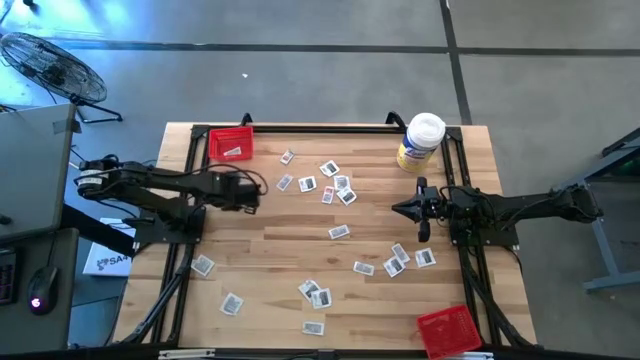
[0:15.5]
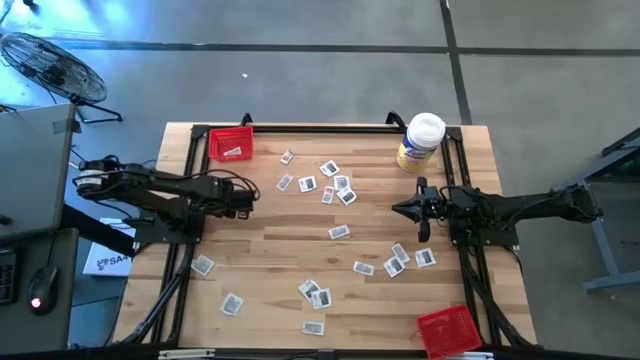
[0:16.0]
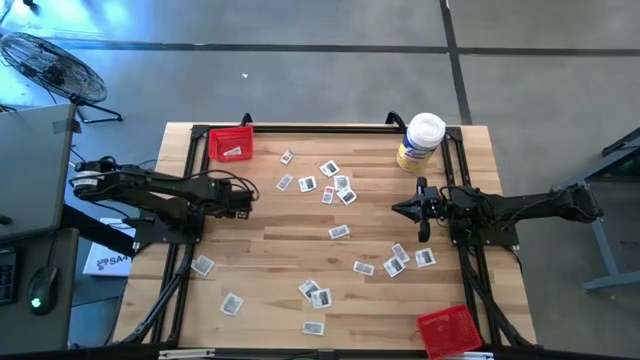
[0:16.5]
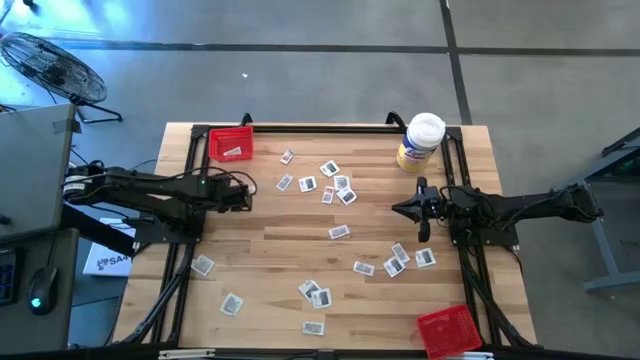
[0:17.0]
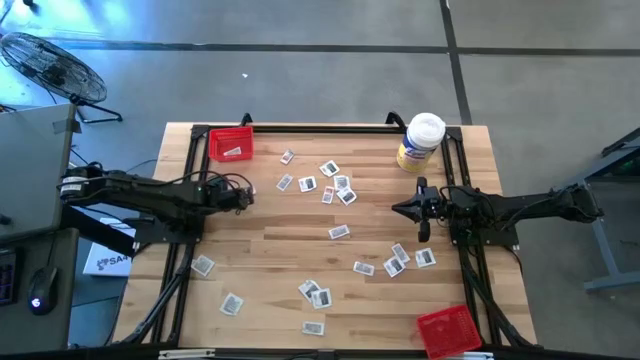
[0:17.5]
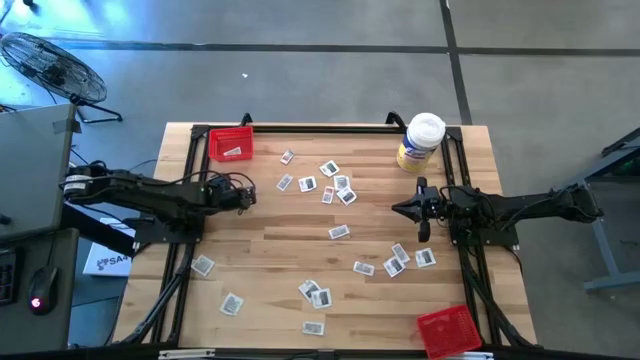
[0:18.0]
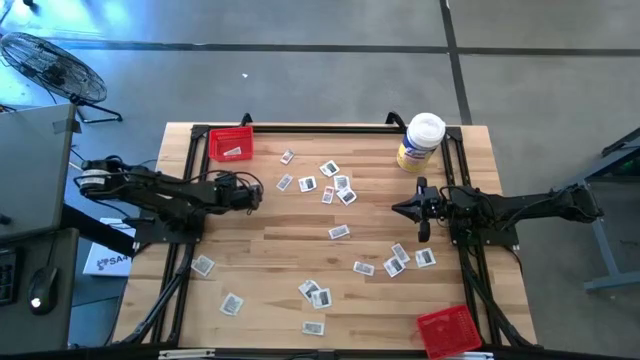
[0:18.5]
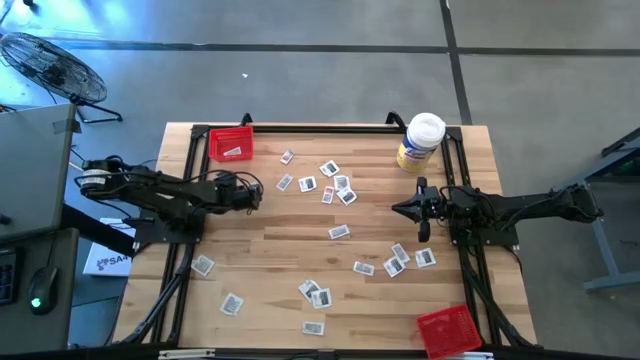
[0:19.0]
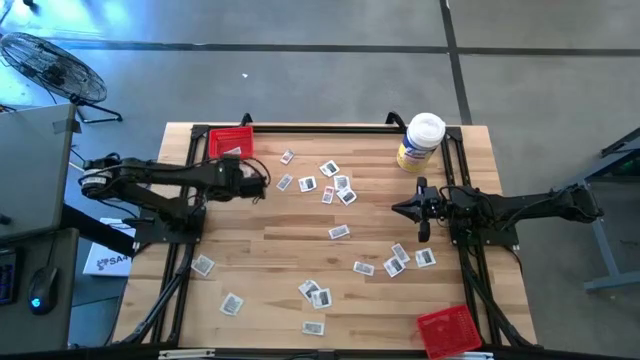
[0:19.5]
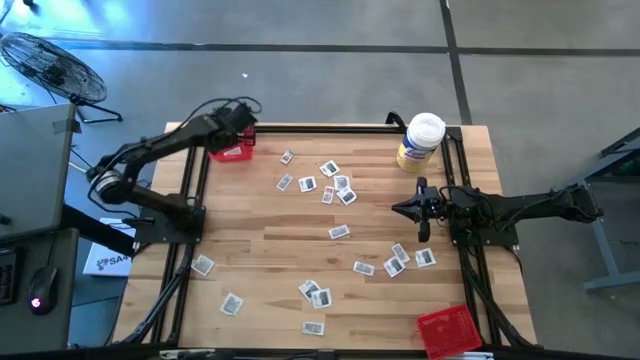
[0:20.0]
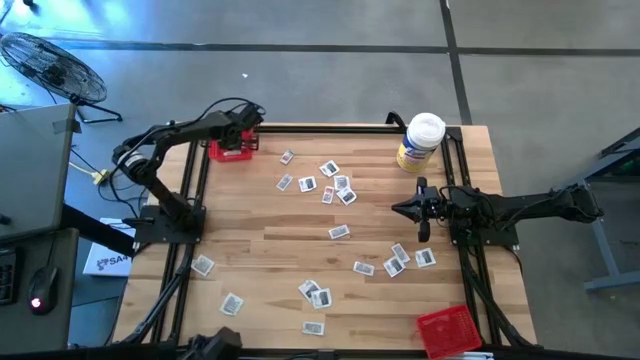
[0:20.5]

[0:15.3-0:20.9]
Task: Pick & Place First Aid Supplies
Put the white and orange ointment pack into the top red bin

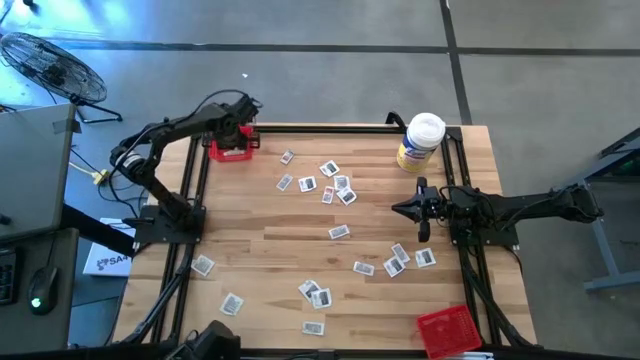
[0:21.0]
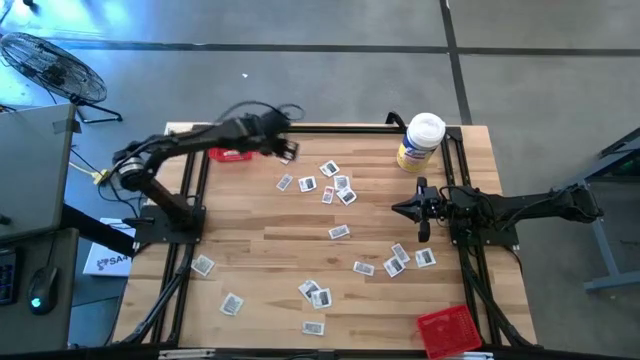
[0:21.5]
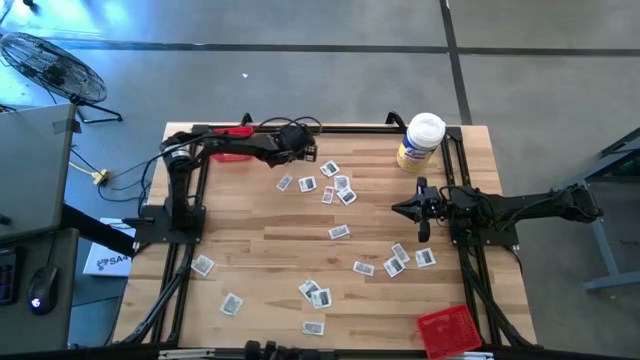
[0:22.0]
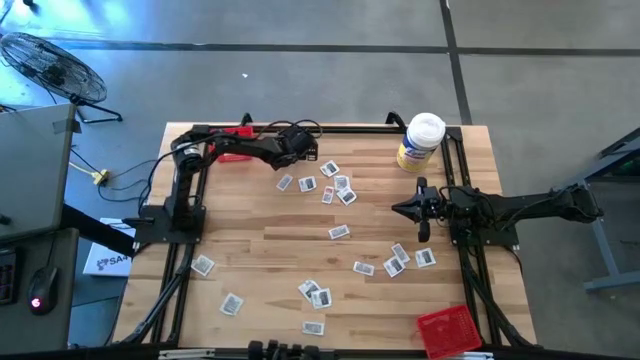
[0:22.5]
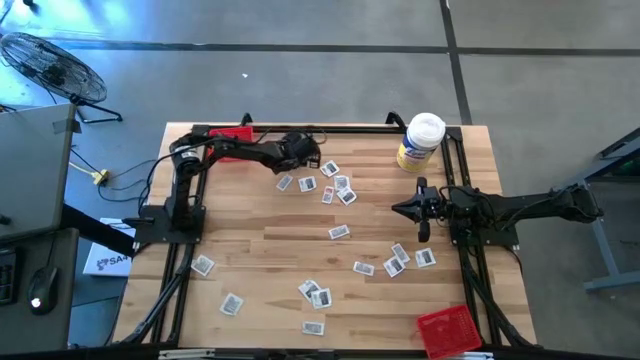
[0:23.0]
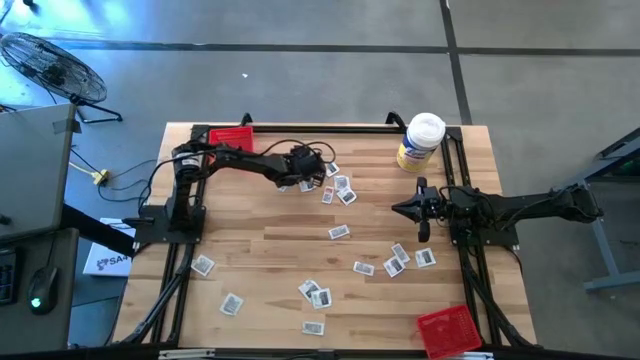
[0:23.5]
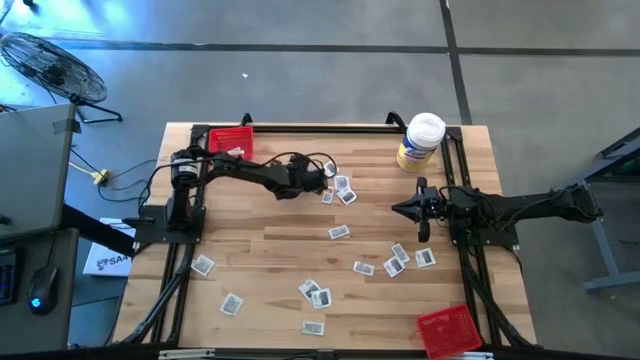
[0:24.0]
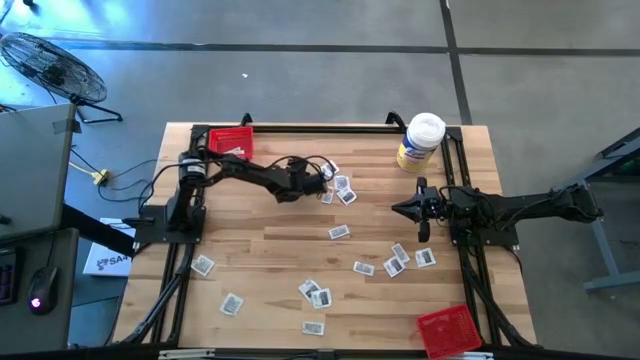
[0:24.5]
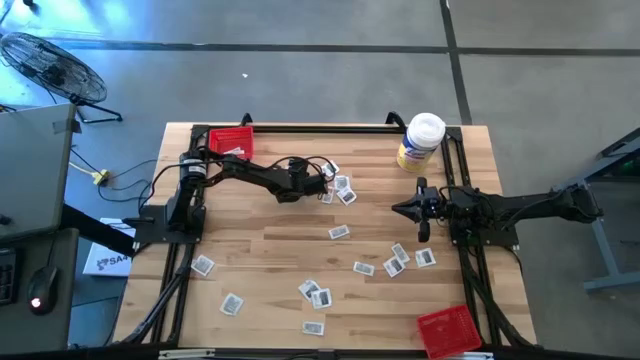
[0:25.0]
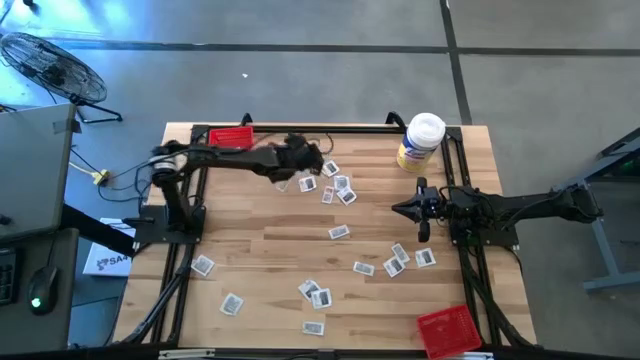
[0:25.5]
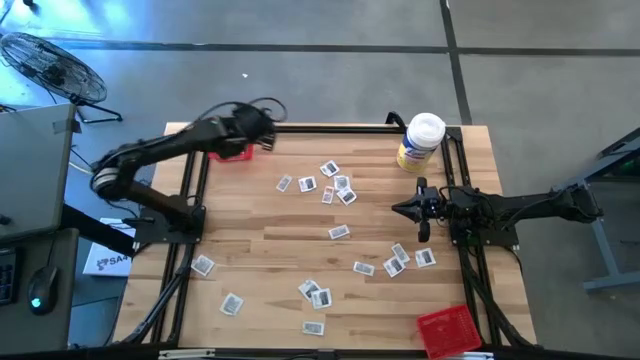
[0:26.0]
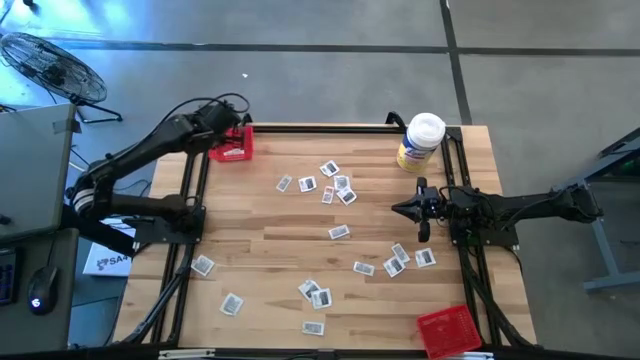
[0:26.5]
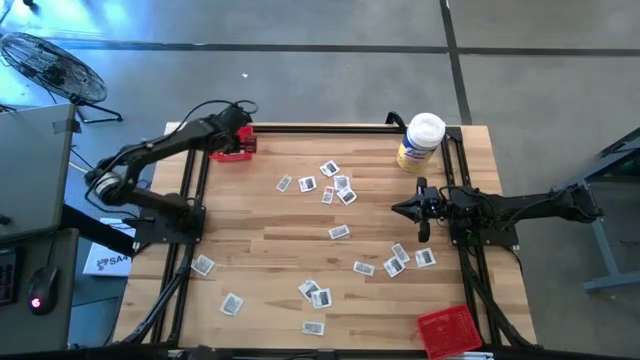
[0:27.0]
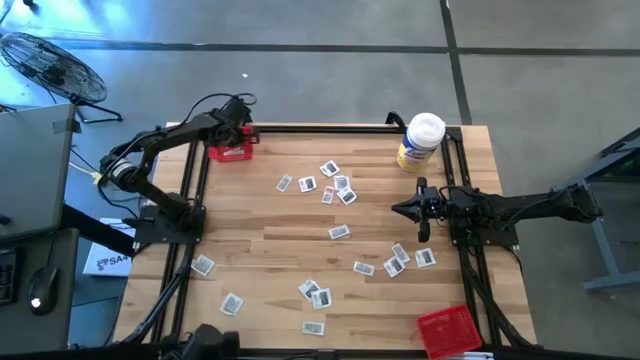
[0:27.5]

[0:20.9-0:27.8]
Put the white and orange ointment pack into the top red bin

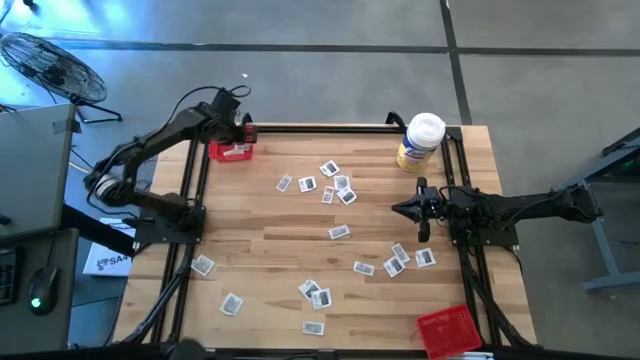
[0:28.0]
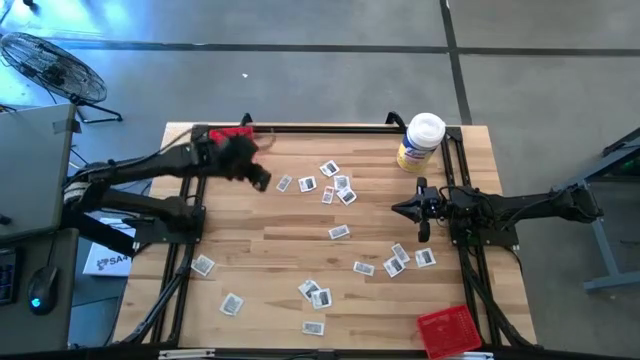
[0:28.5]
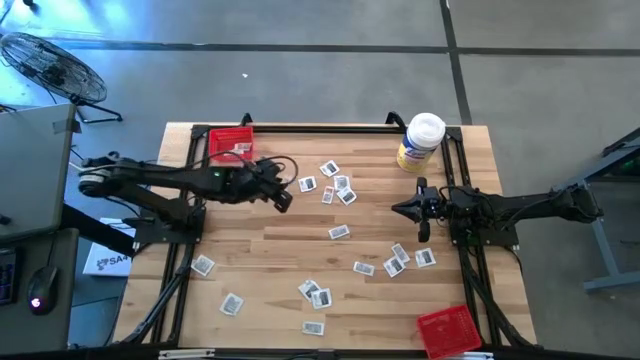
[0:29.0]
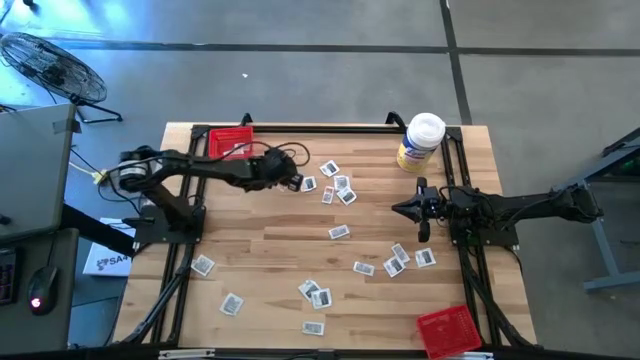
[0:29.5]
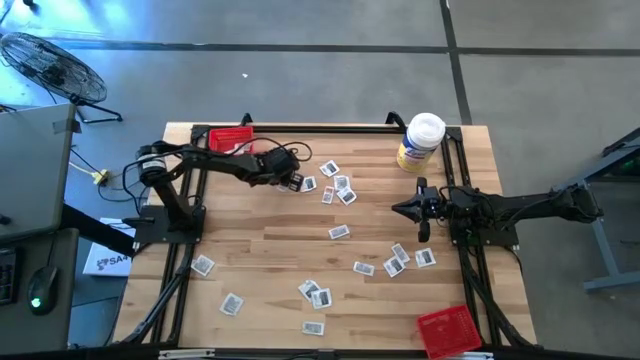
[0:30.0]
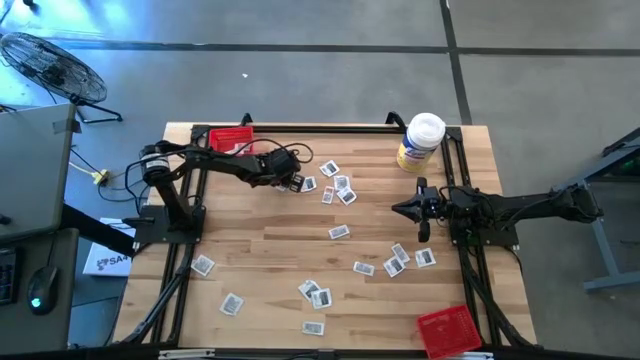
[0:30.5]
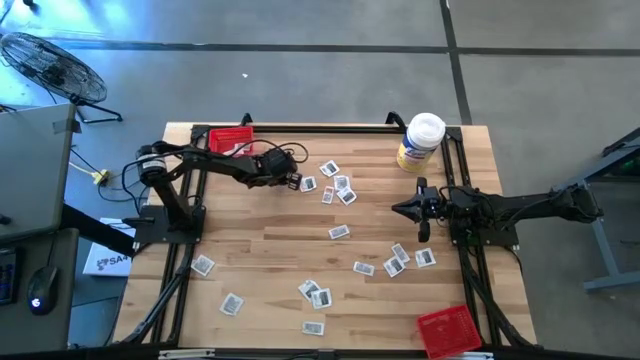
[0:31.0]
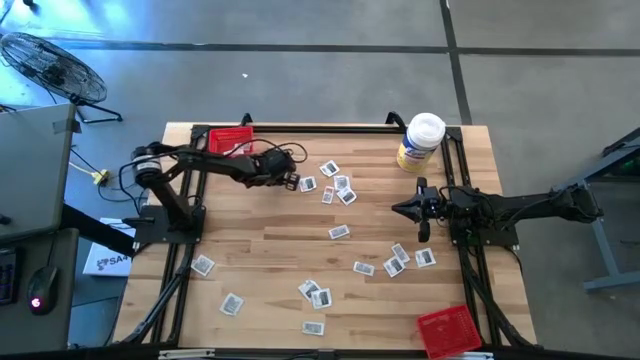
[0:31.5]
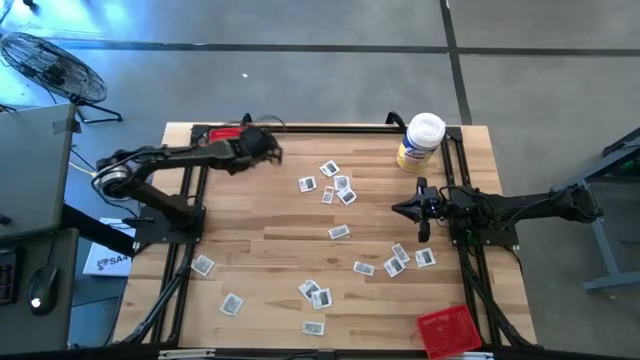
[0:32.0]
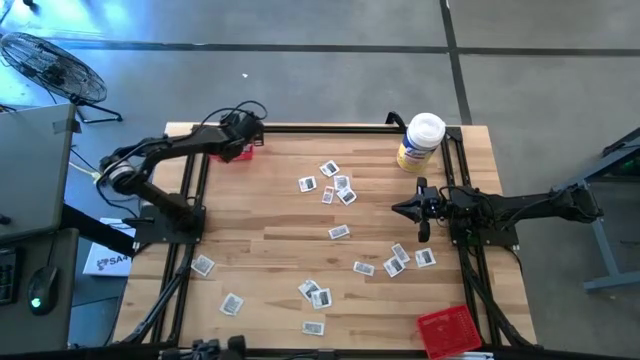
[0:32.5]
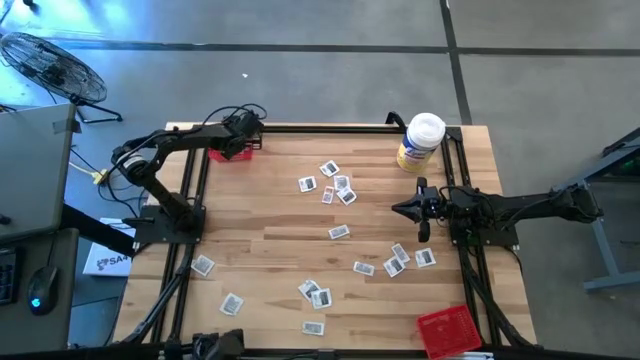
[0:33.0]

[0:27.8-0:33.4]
Put the white and orange ointment pack into the top red bin

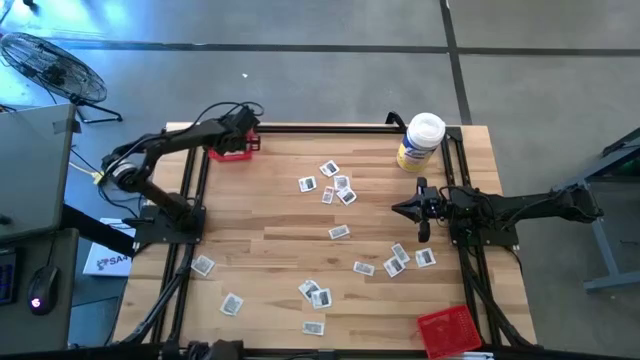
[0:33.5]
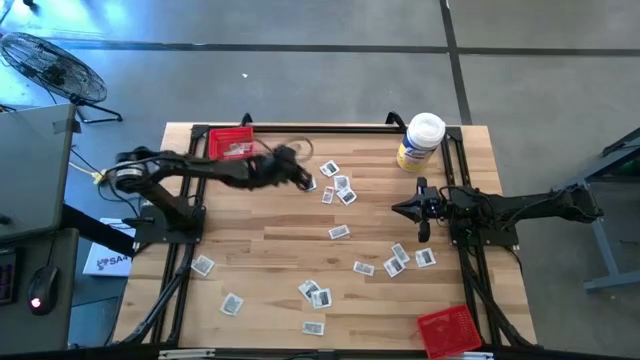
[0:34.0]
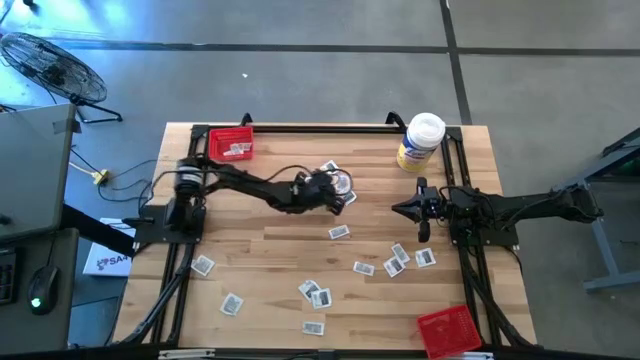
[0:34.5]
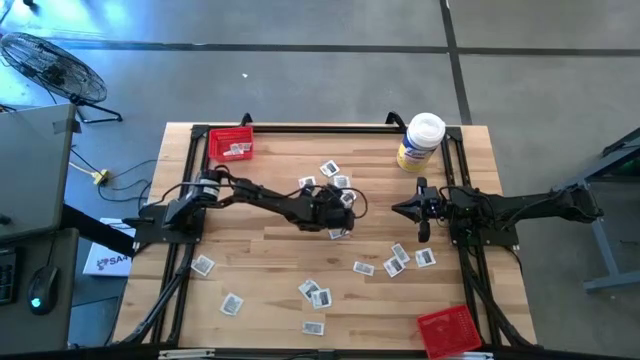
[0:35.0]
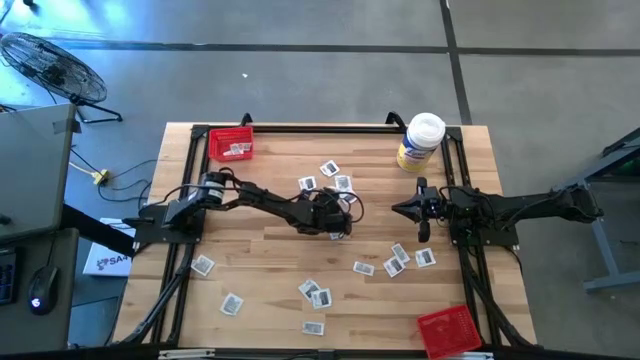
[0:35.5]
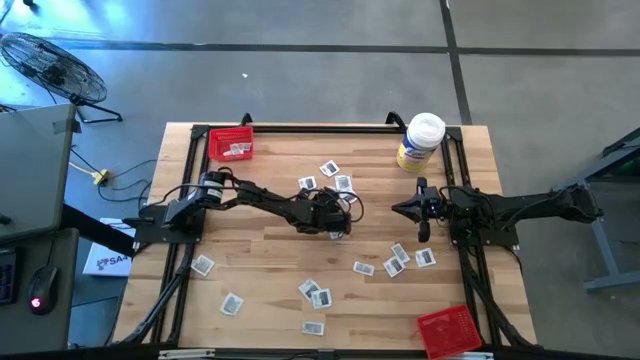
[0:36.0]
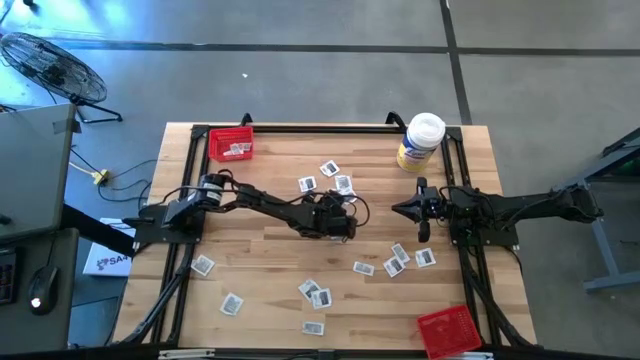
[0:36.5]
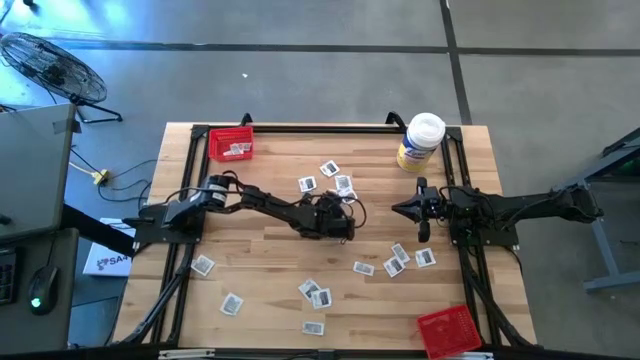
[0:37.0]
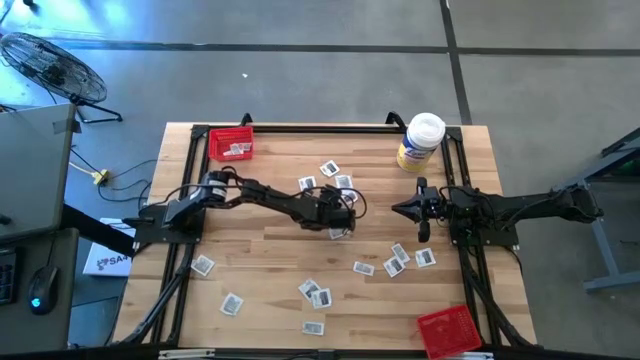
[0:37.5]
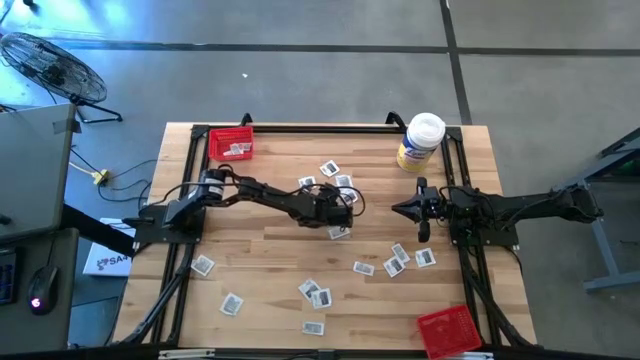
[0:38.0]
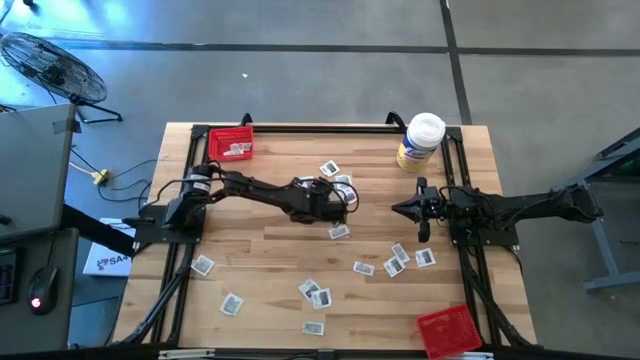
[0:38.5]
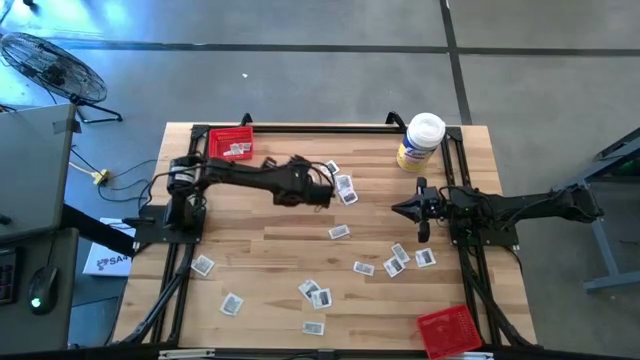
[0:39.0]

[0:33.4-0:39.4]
Put the white and orange ointment pack into the top red bin
